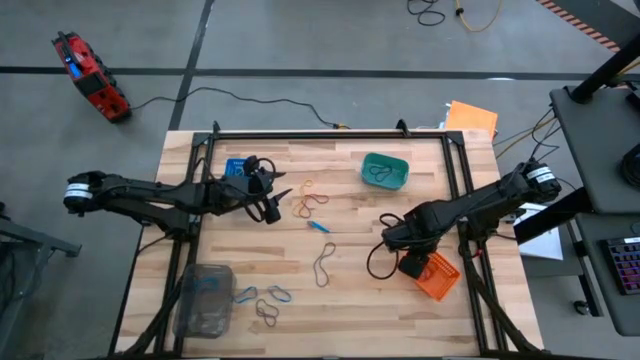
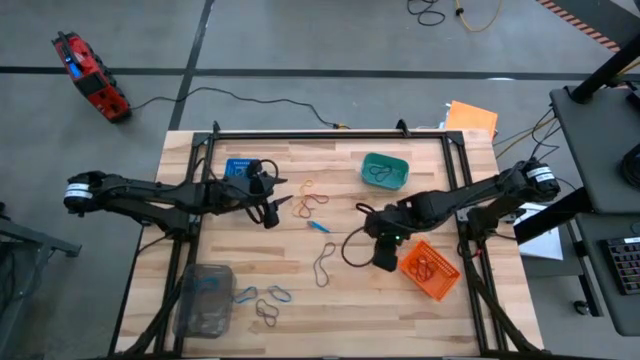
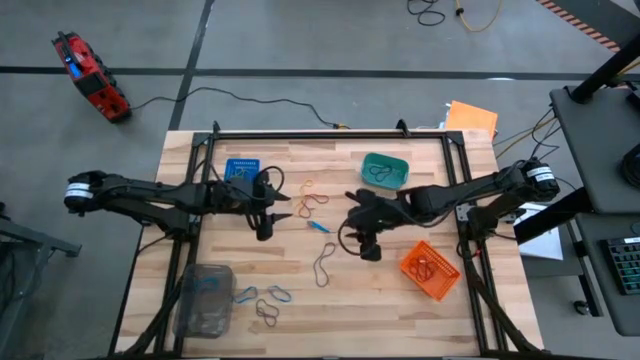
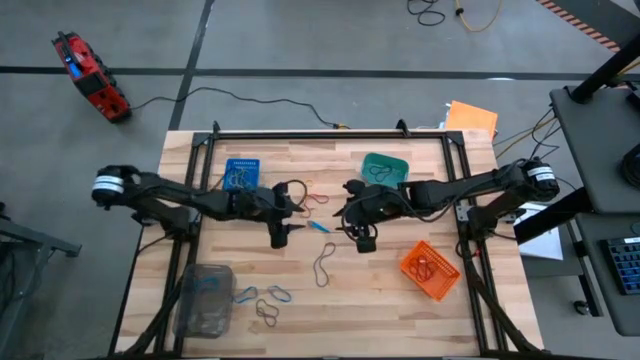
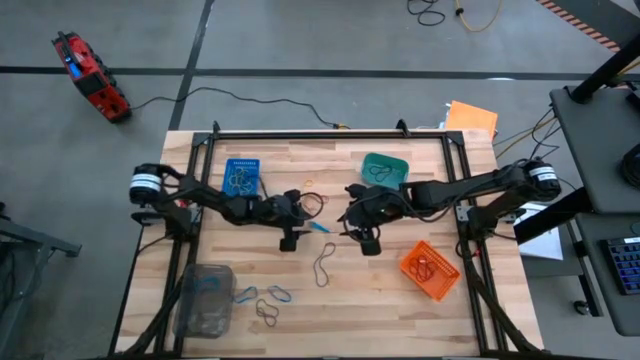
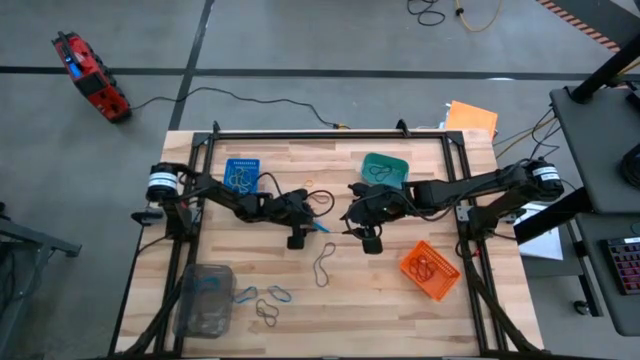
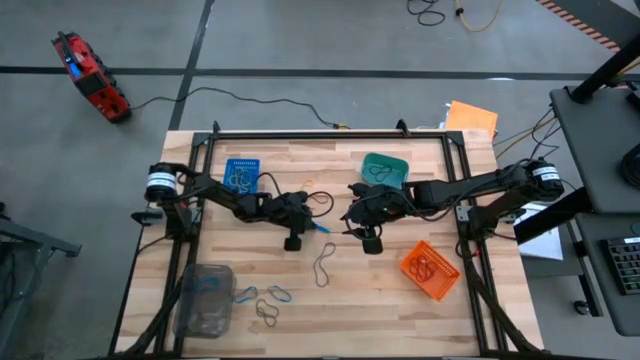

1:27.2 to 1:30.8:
Task: Sort rubber bands into baskets
Put the blue rubberband into the black bin

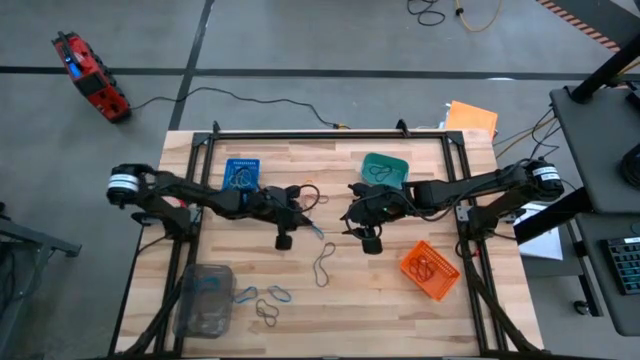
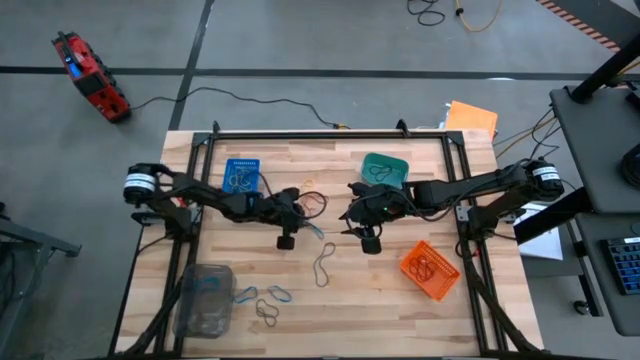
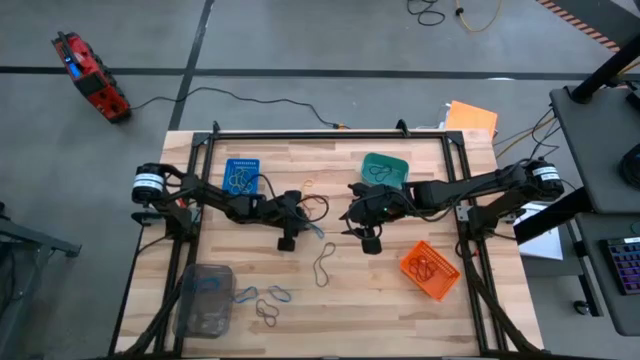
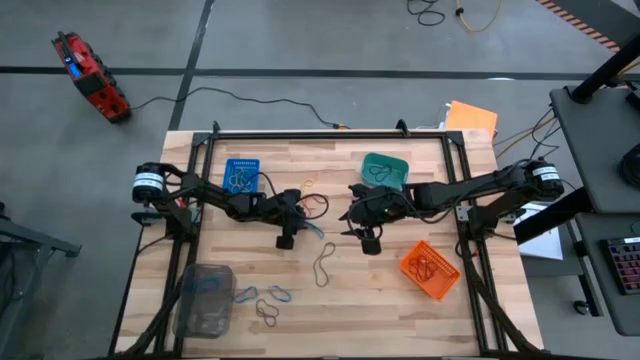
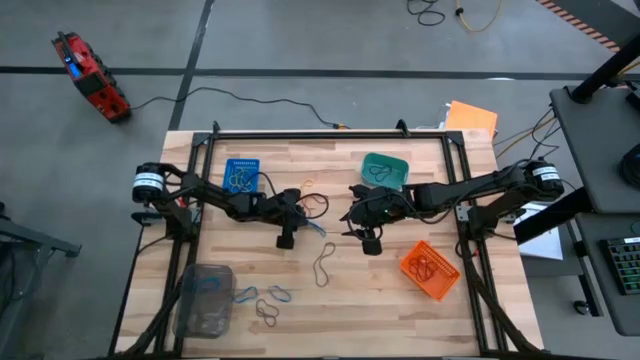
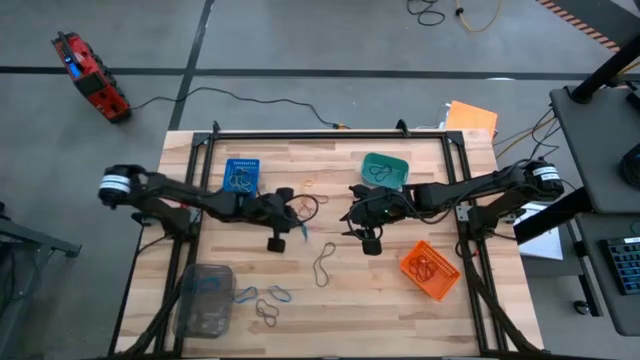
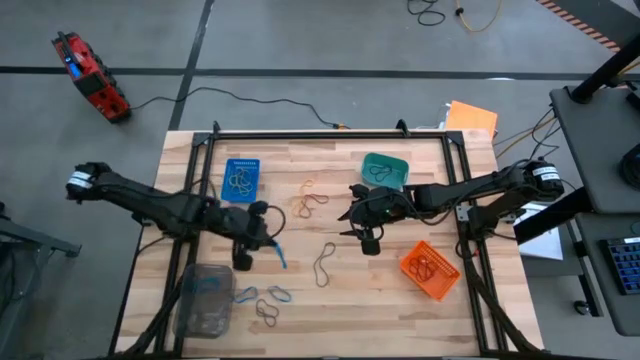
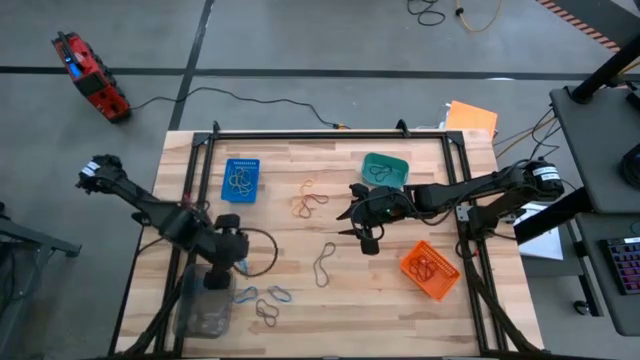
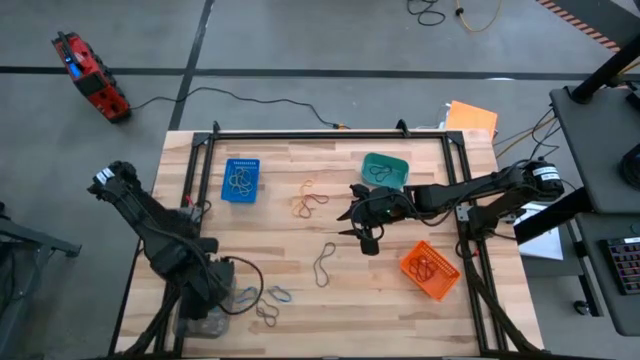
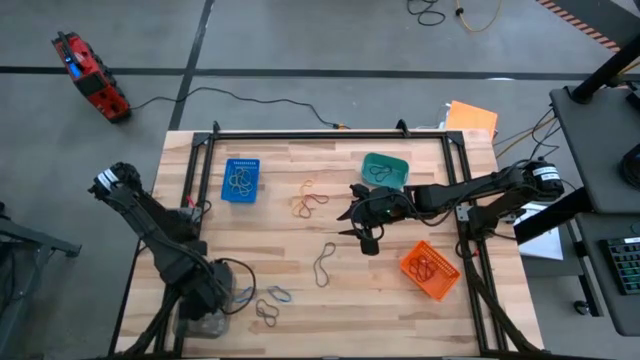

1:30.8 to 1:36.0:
Put the blue rubberband into the black bin

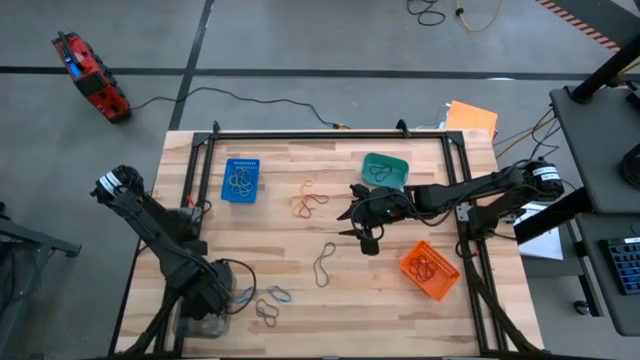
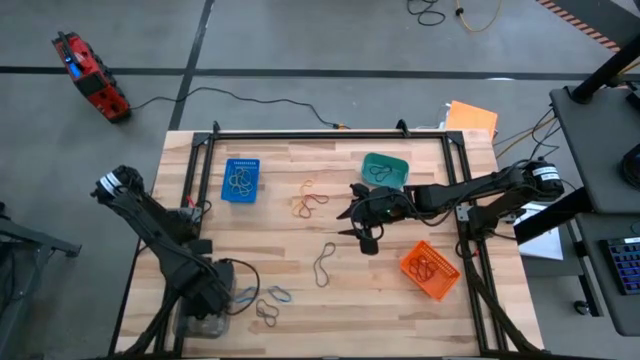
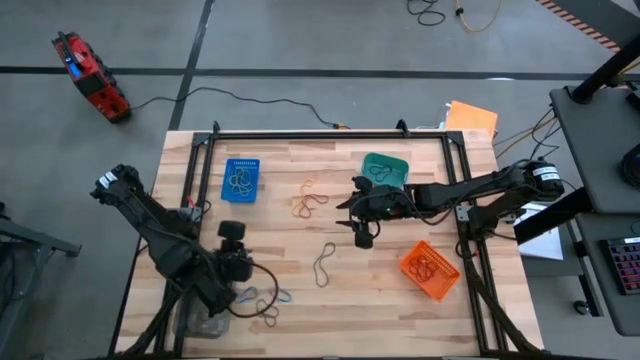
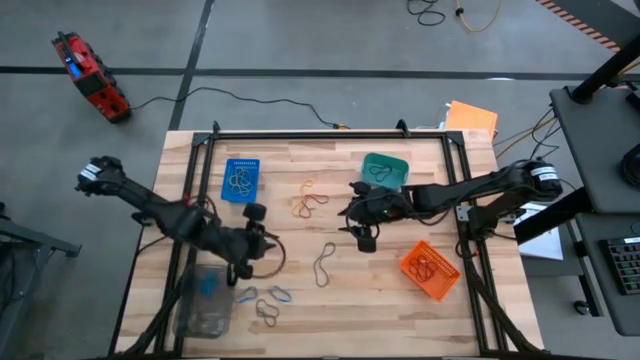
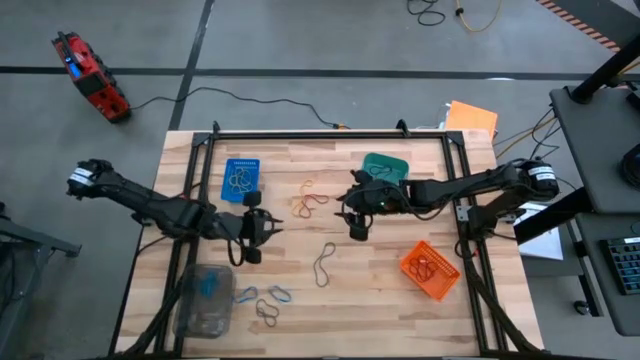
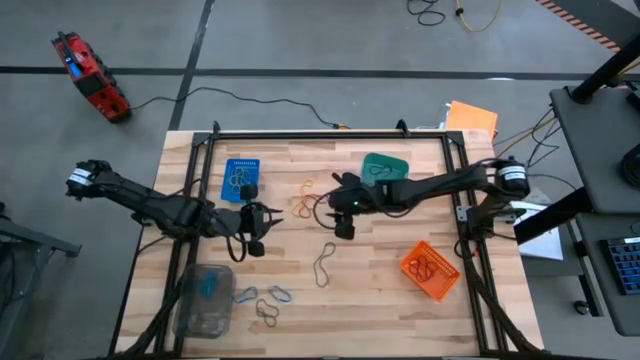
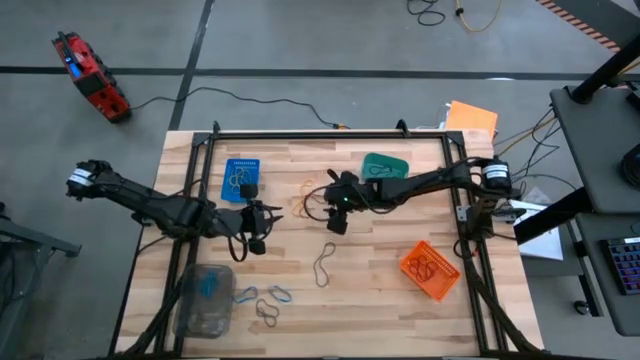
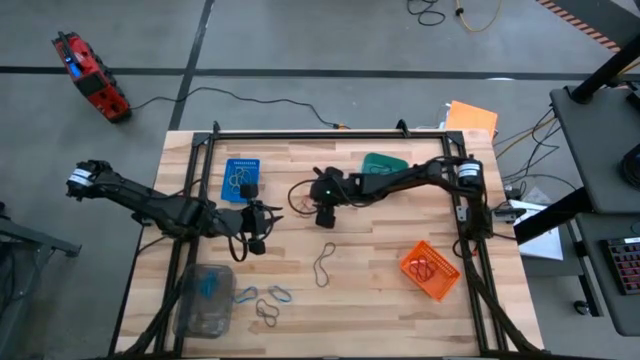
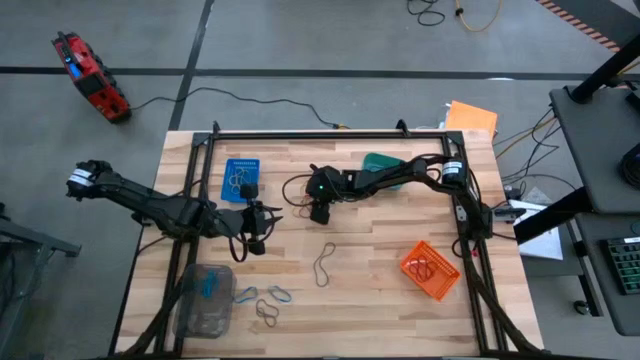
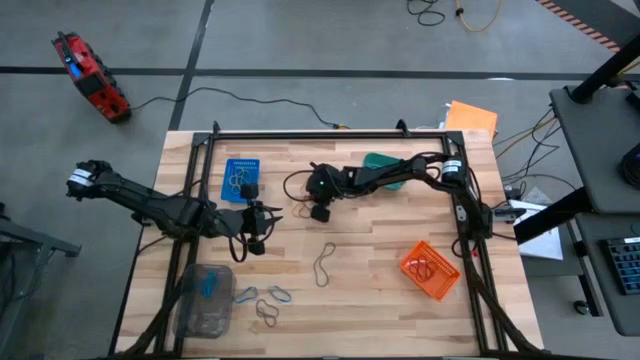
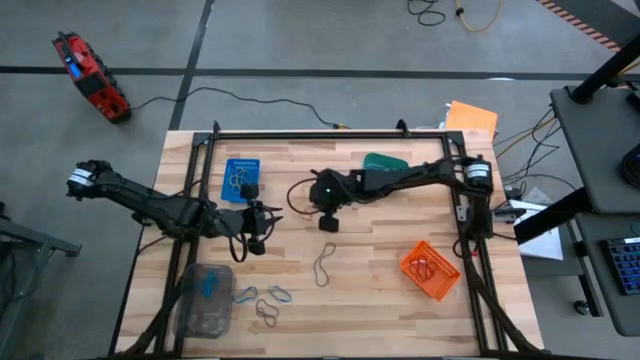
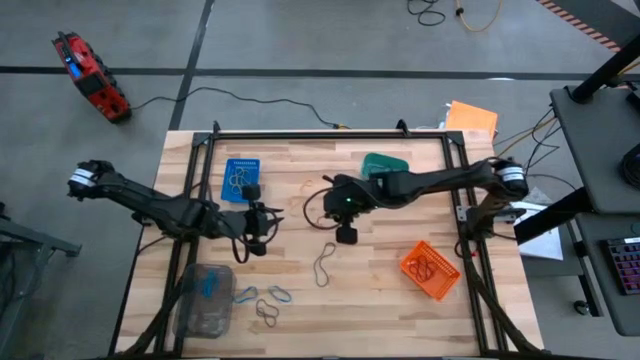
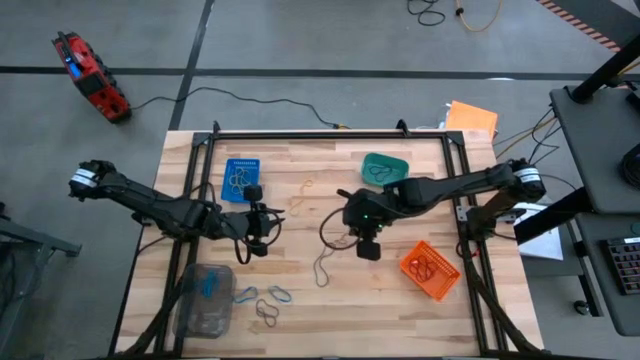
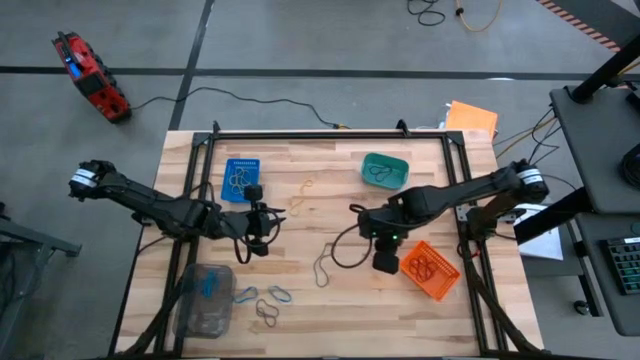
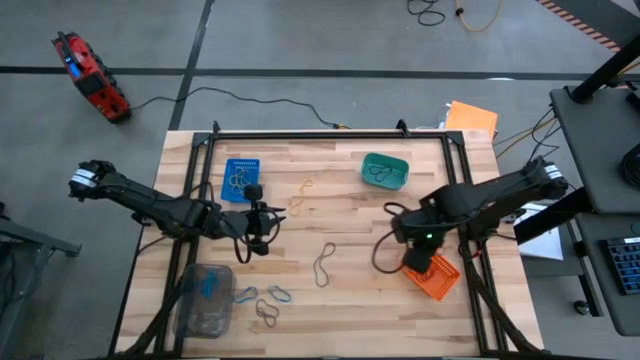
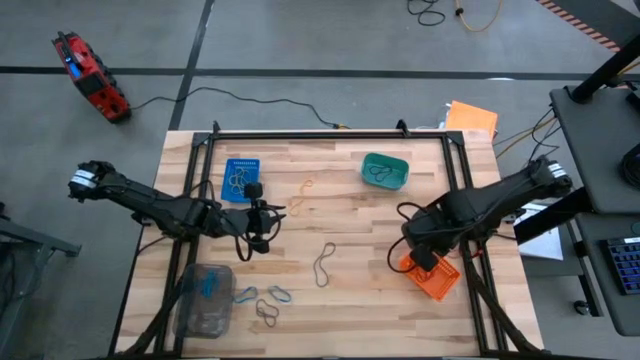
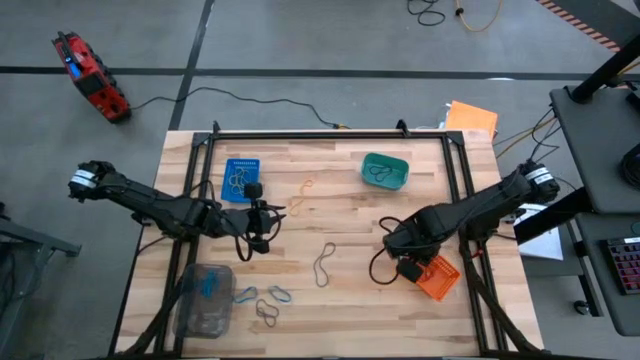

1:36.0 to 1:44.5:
Put the red rubberband into the orange bin

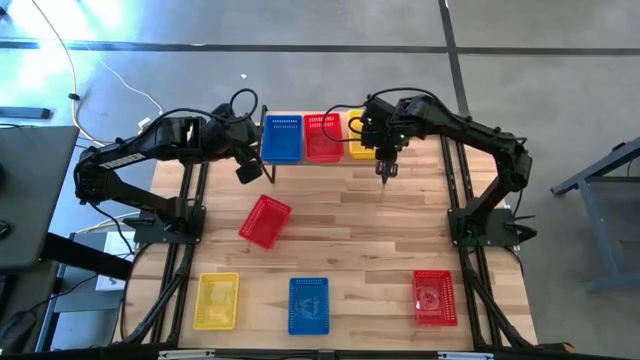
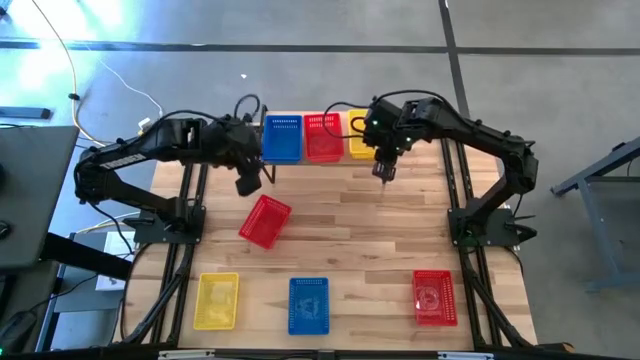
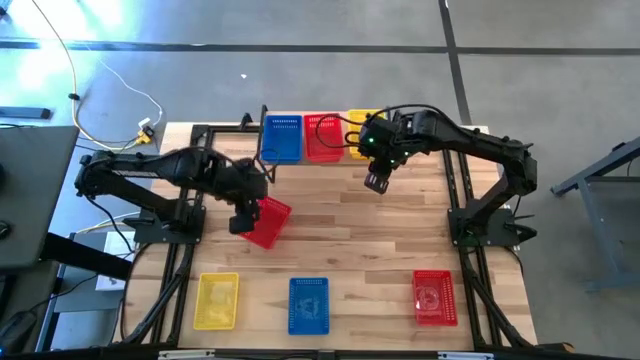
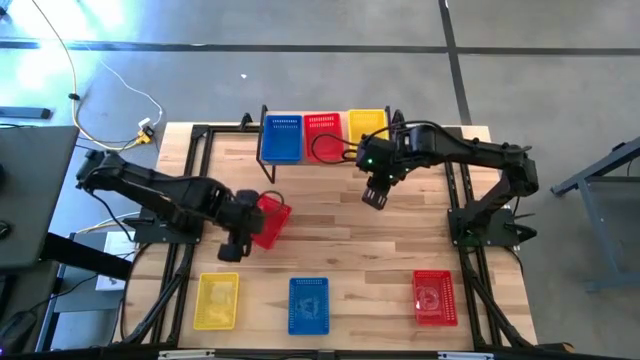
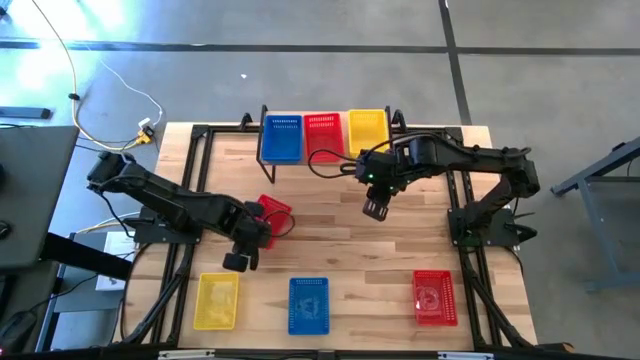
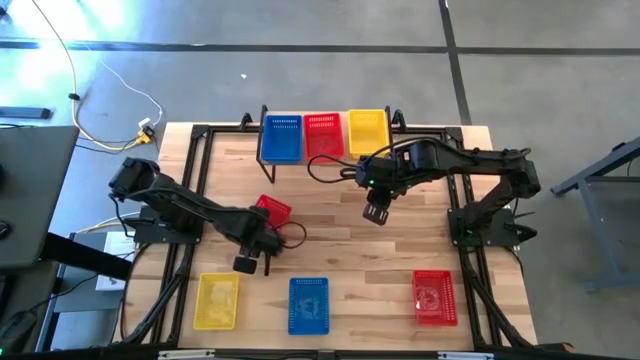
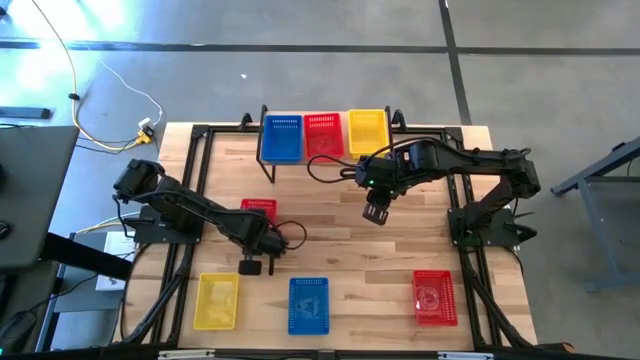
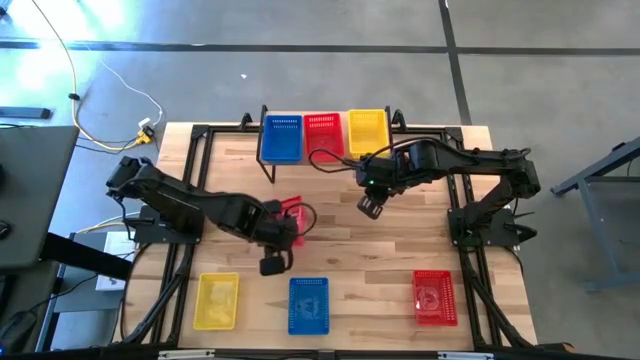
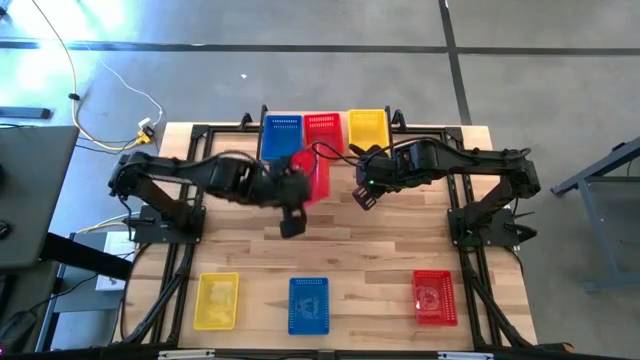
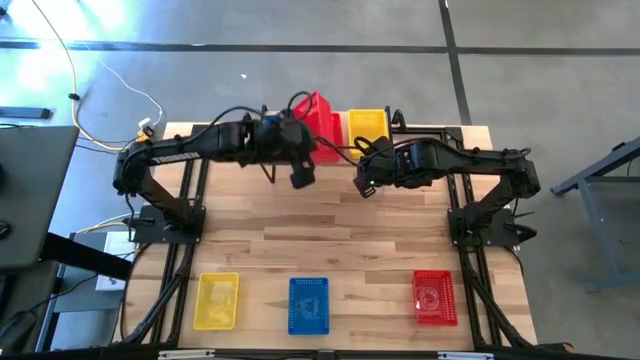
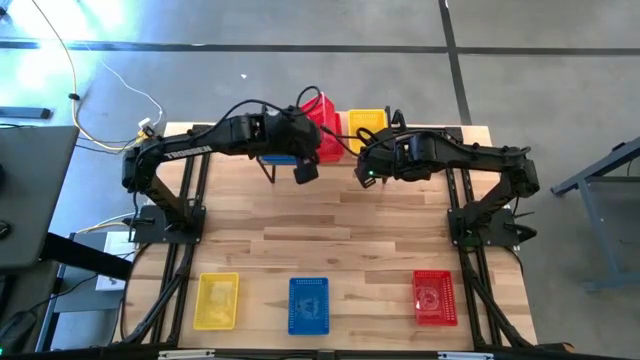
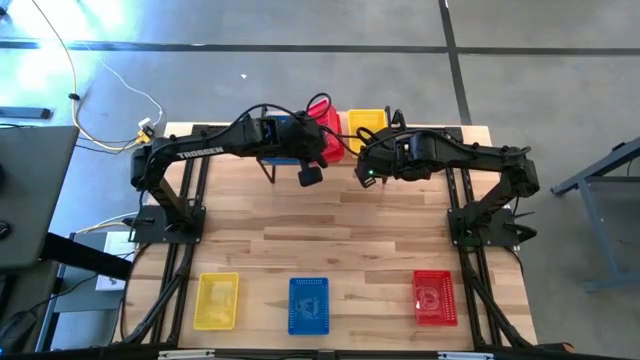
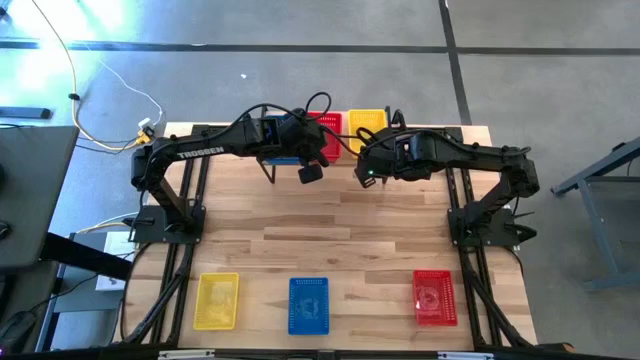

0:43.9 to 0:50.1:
Task: Stack baskets on shelf by color
Stack the top red basket on top of the red basket on the shelf
